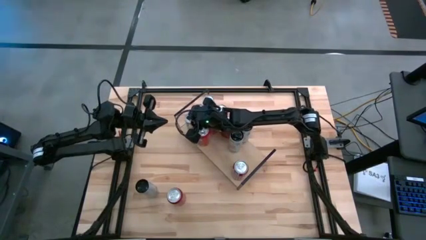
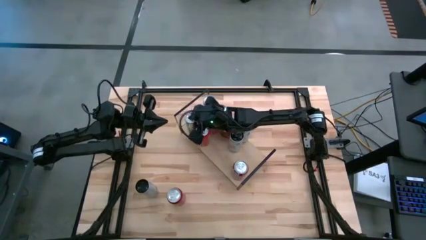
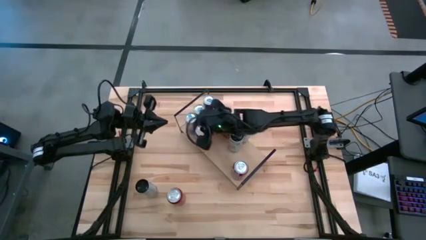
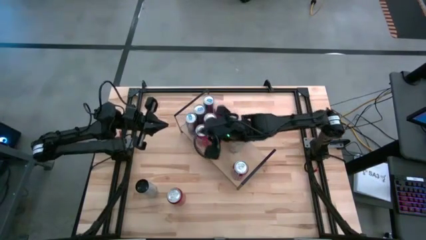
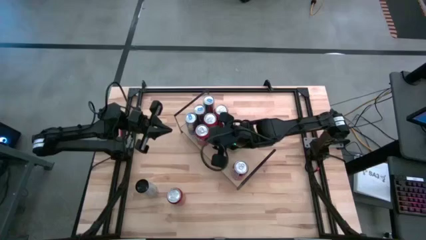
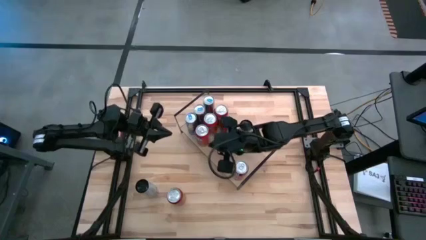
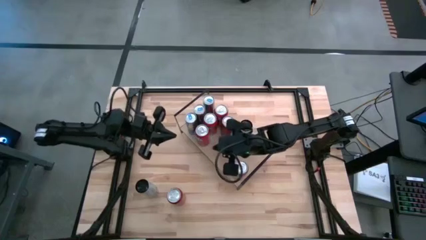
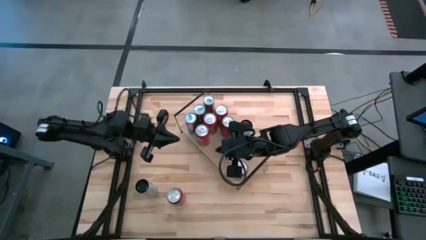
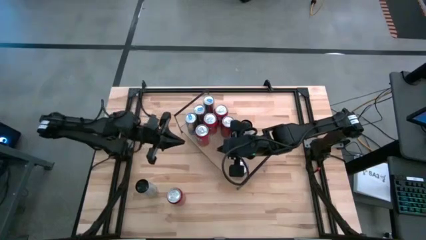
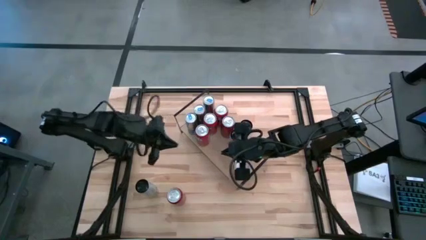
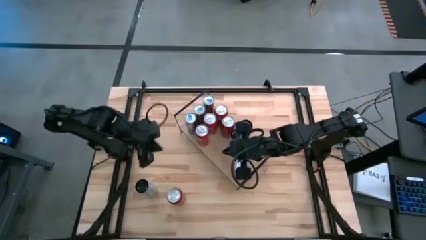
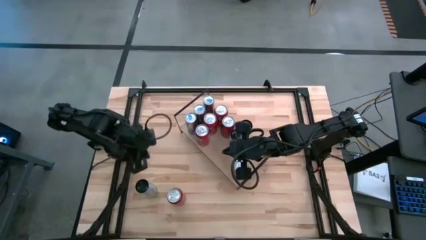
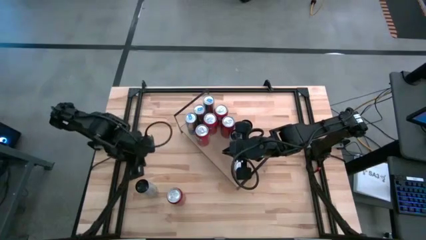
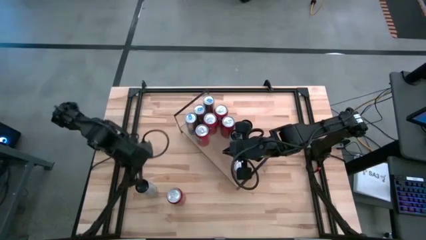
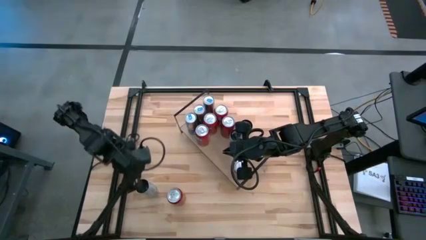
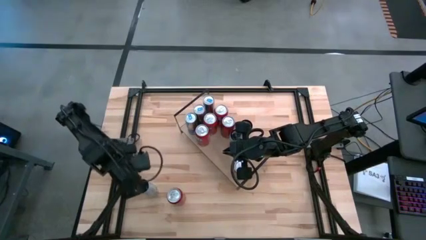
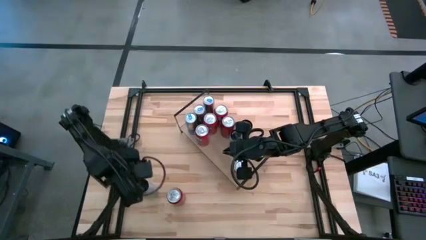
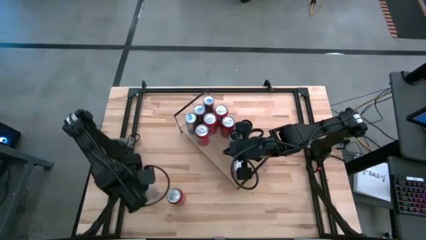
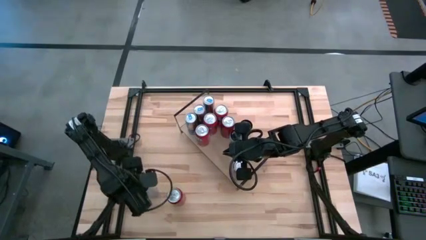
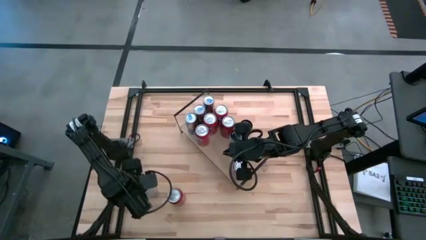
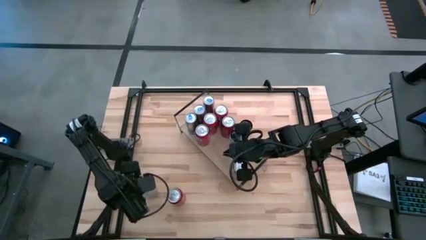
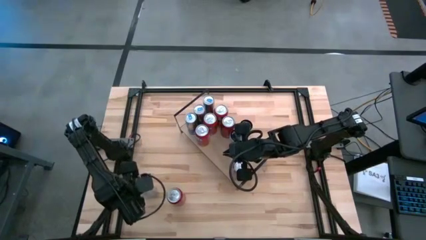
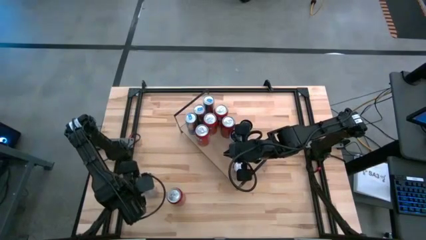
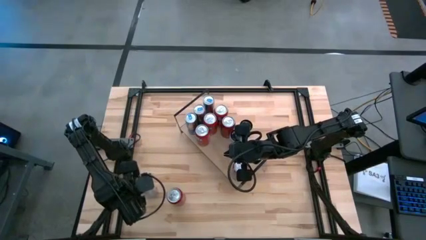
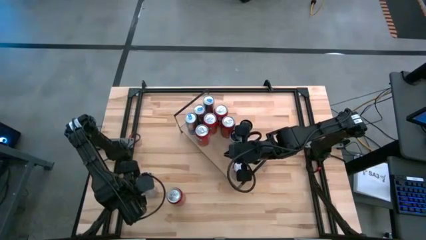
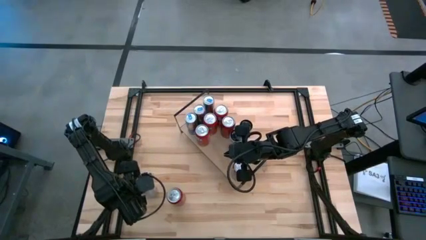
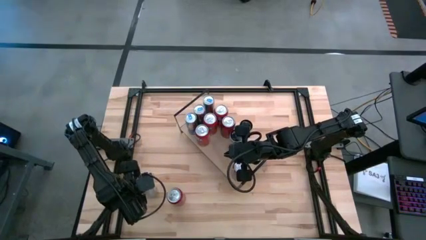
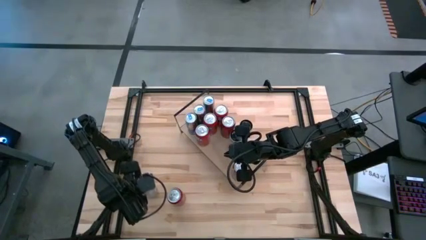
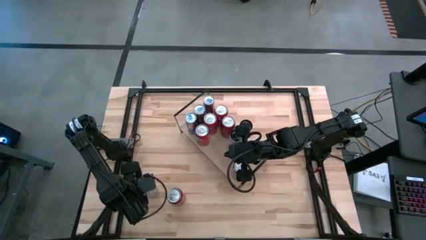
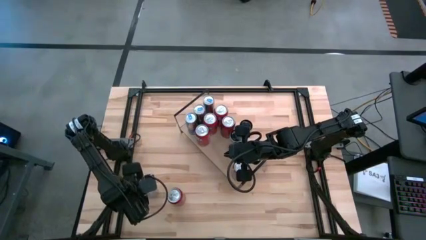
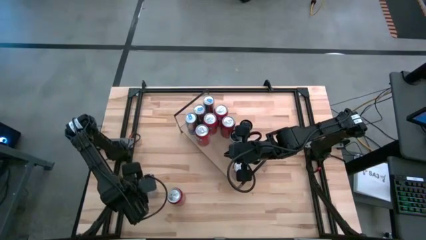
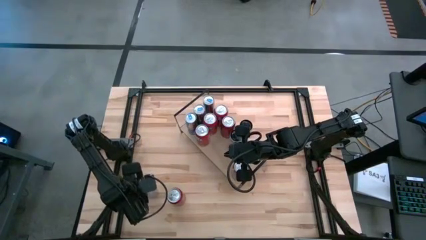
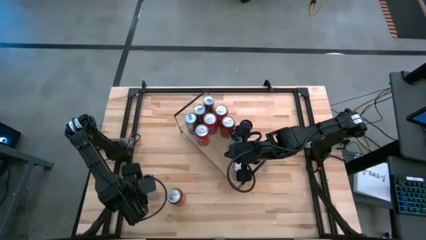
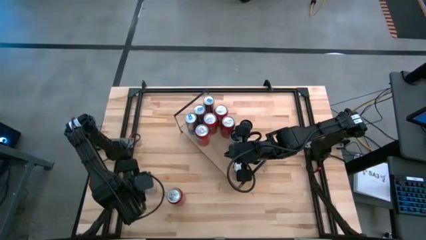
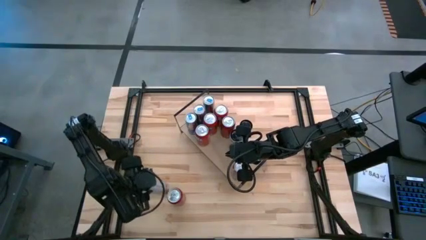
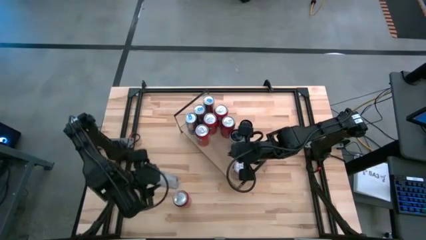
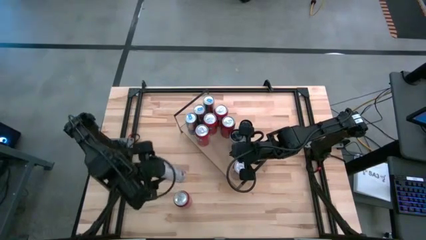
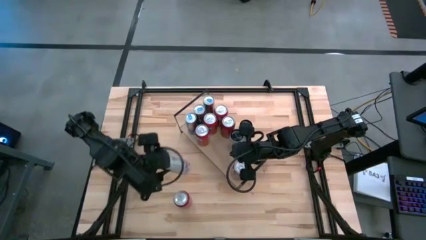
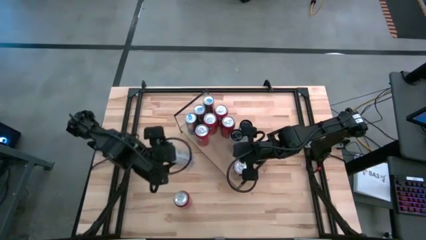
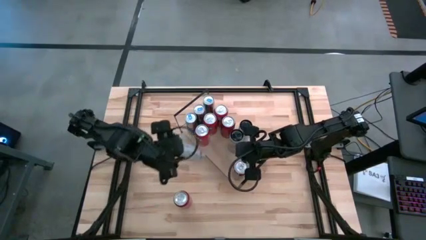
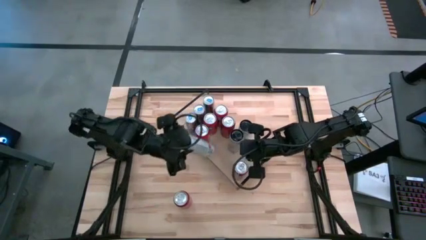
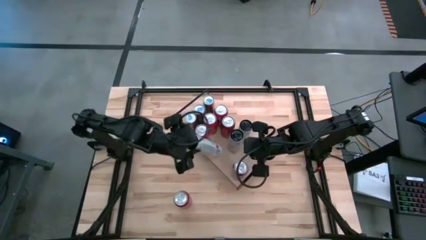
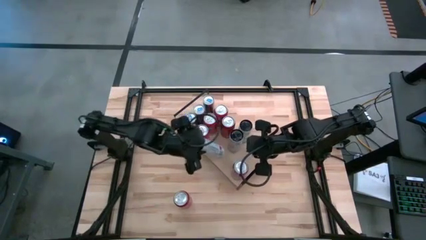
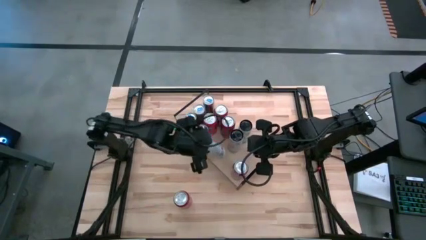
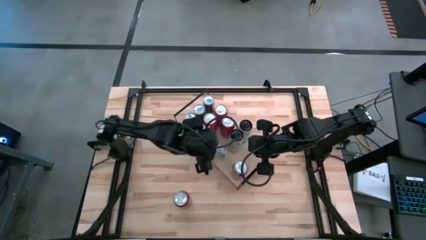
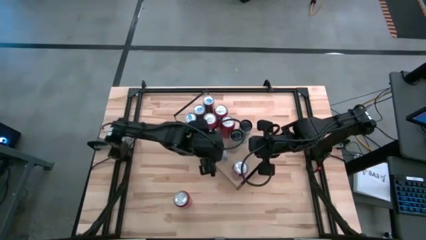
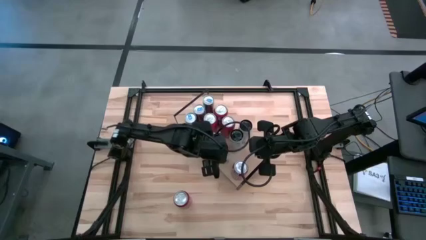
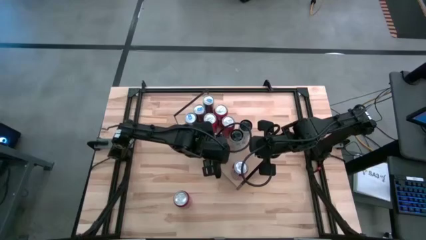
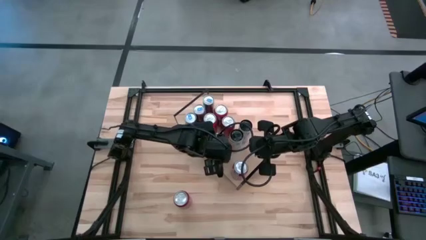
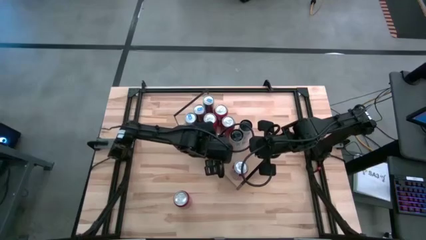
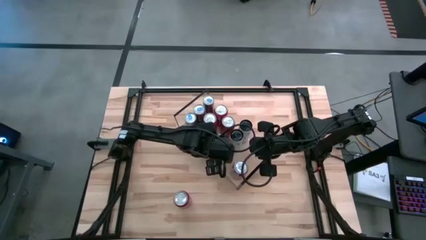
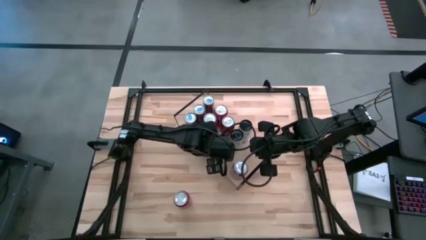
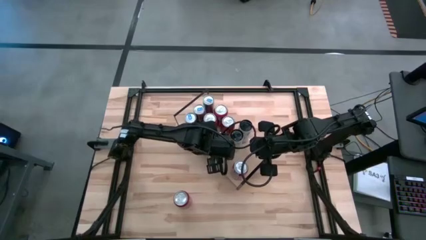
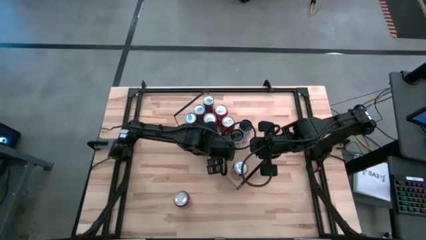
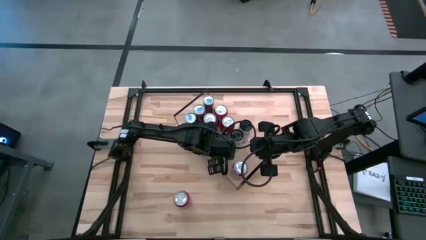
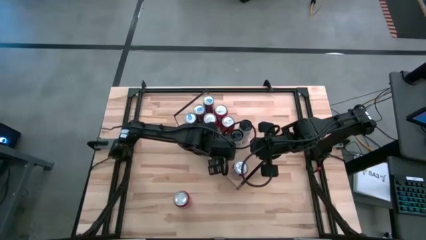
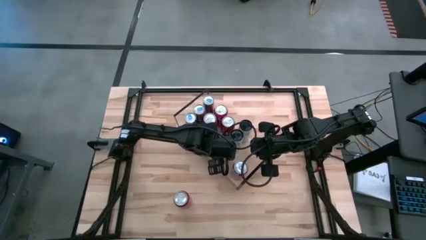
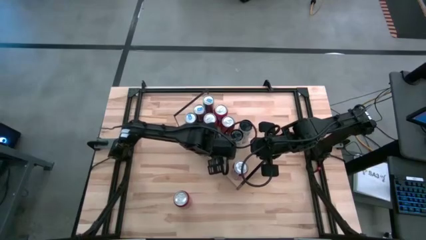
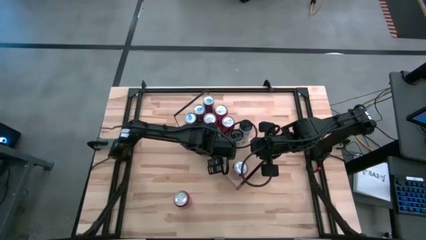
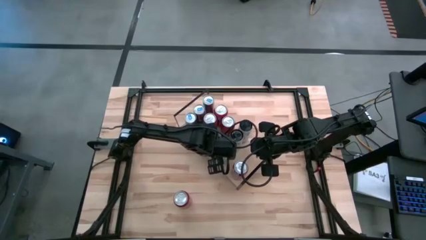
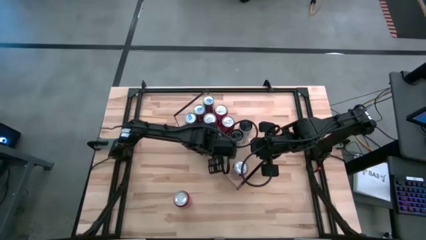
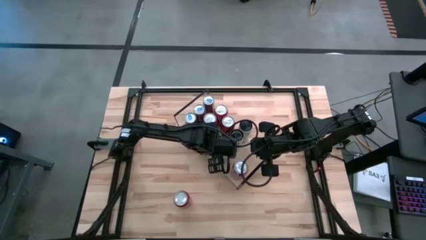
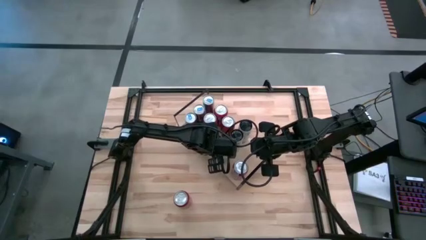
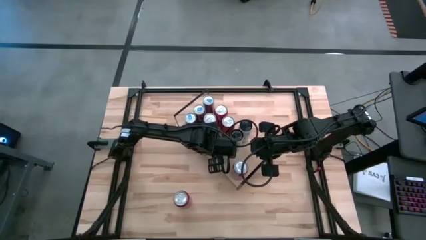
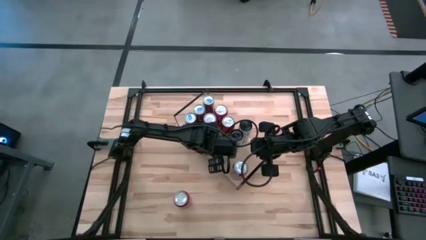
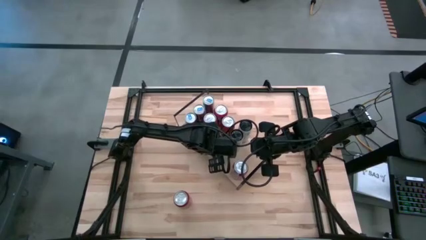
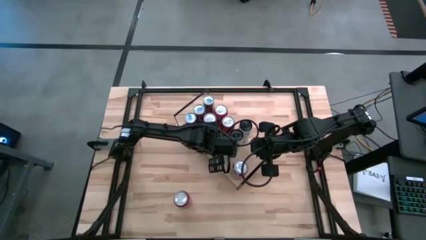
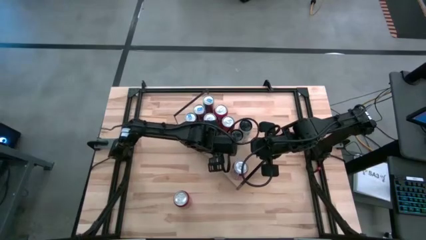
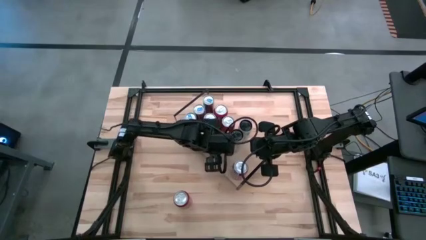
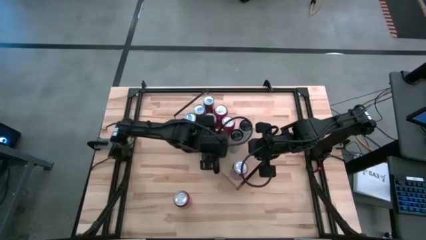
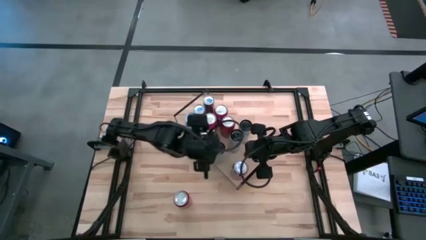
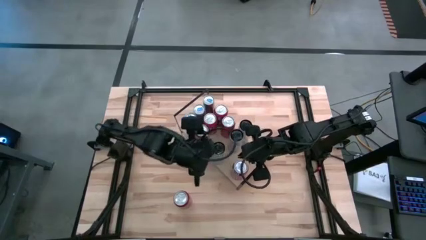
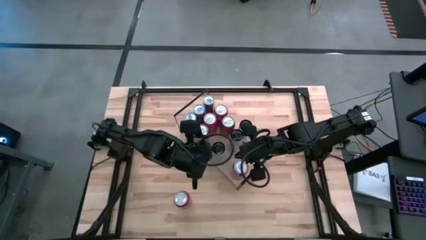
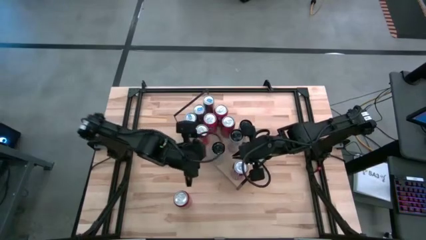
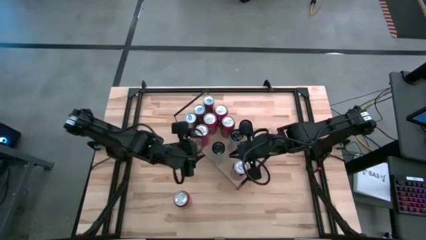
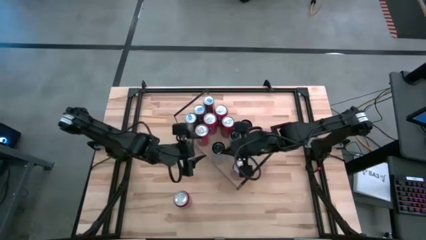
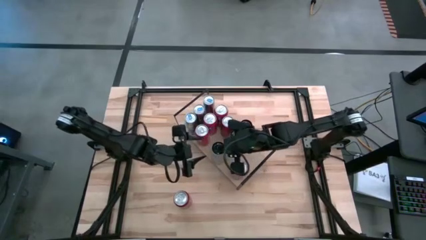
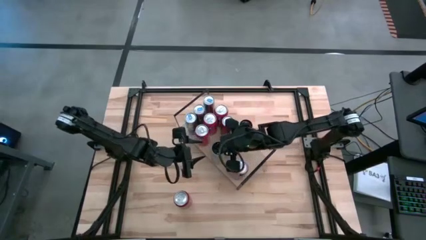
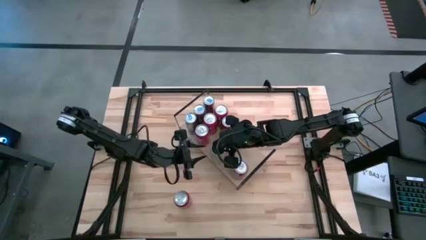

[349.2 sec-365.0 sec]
Task: Place canned beverage on shelf
Put the pink soda can on the shelf aligned with the pink soda can on the shelf
